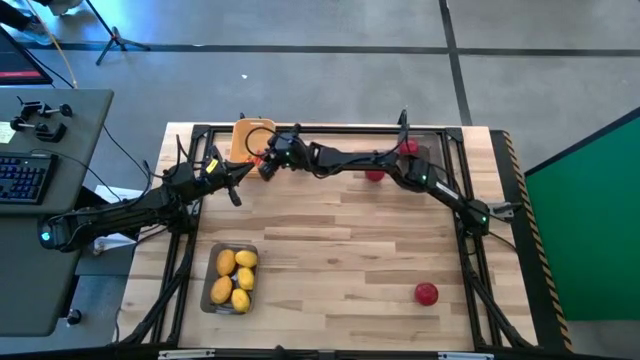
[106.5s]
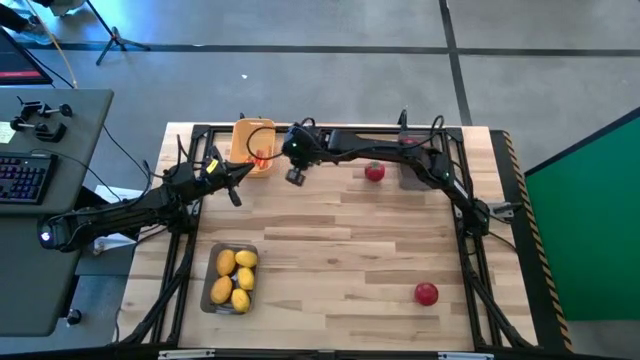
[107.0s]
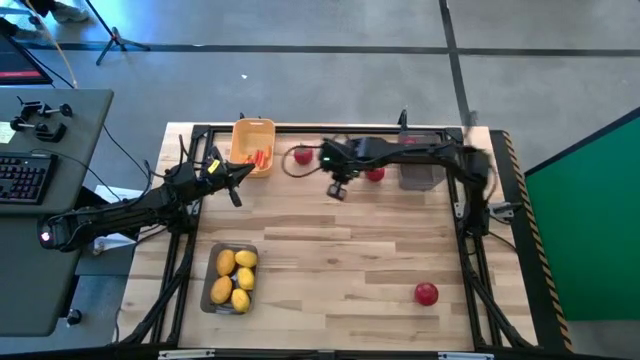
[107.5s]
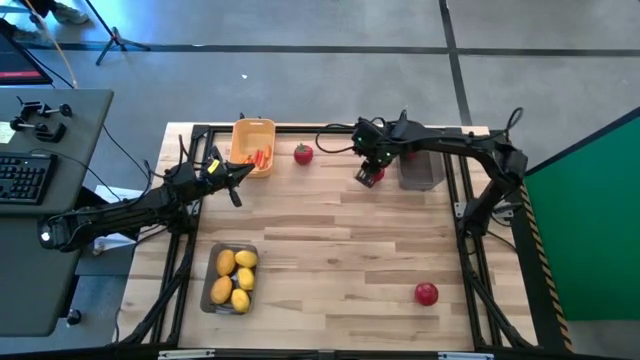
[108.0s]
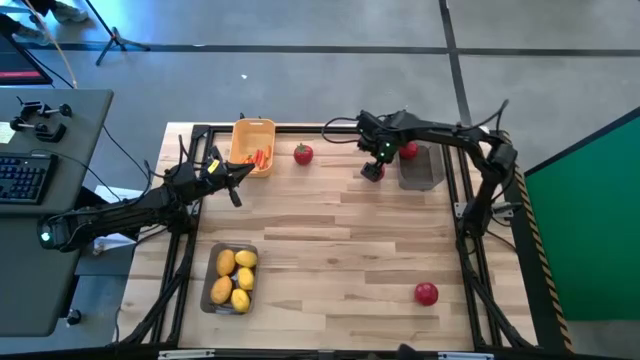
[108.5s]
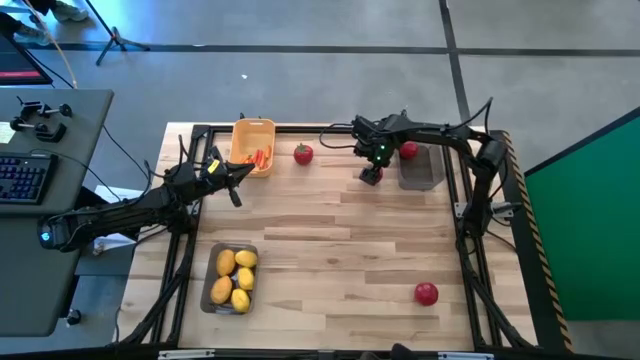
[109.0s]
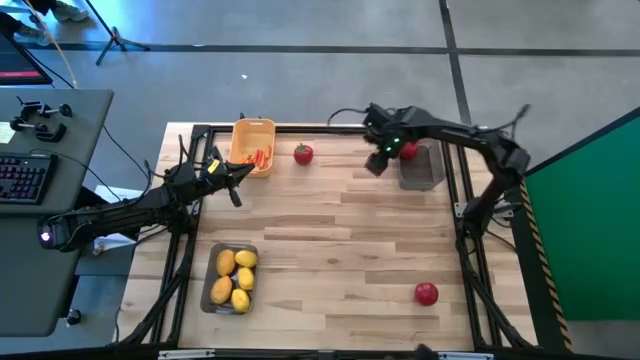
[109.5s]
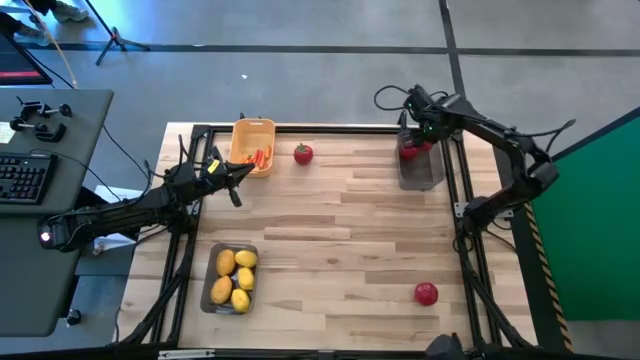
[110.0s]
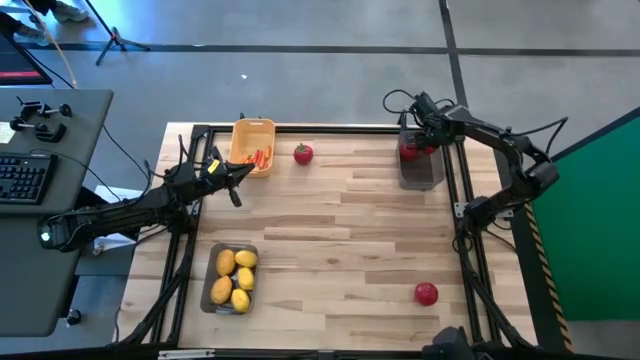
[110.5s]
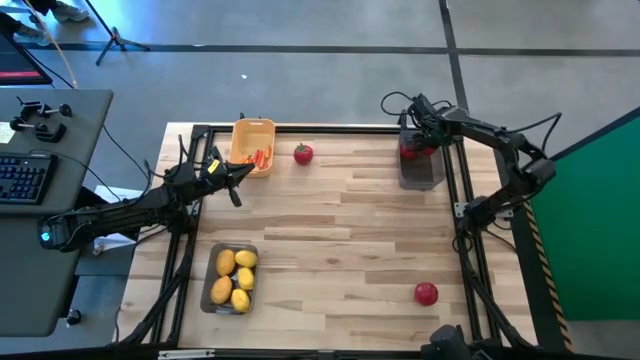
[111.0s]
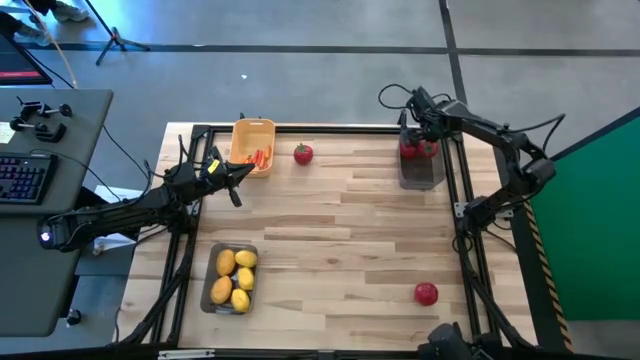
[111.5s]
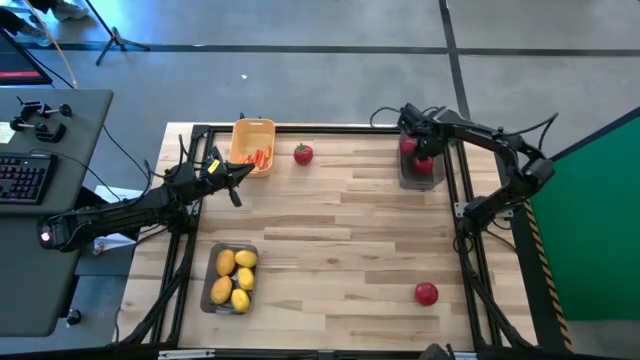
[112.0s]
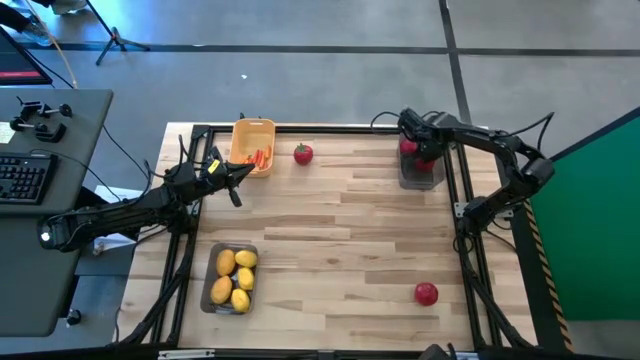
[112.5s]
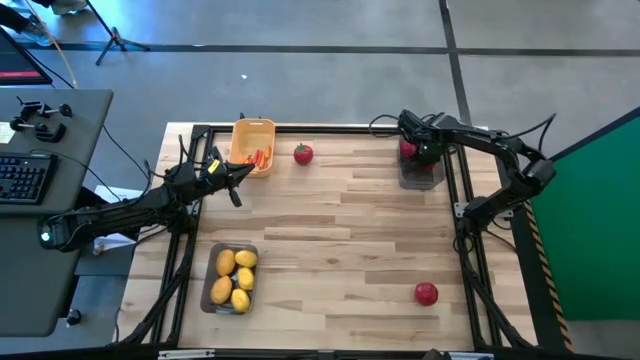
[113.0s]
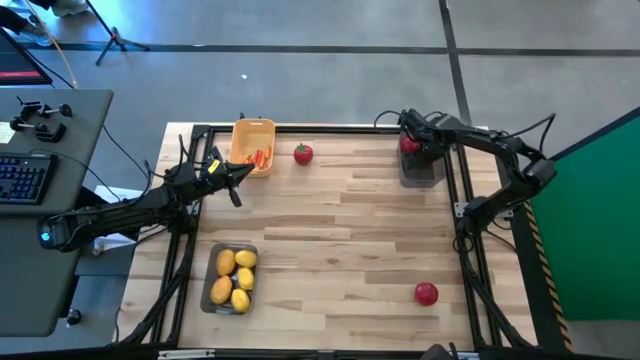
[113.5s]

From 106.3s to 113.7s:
Task: Sort produce into baskets
Put the tomato into the top gray bin

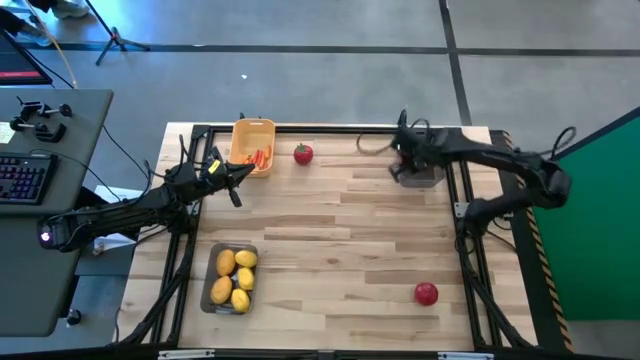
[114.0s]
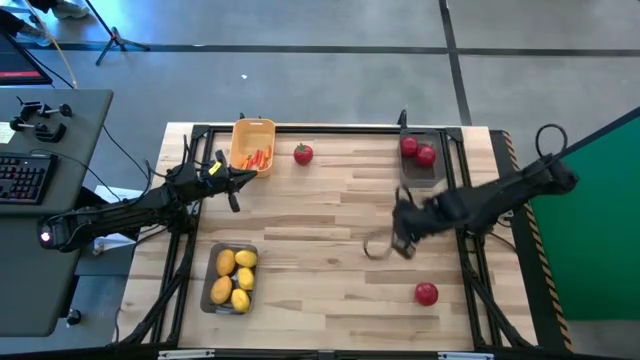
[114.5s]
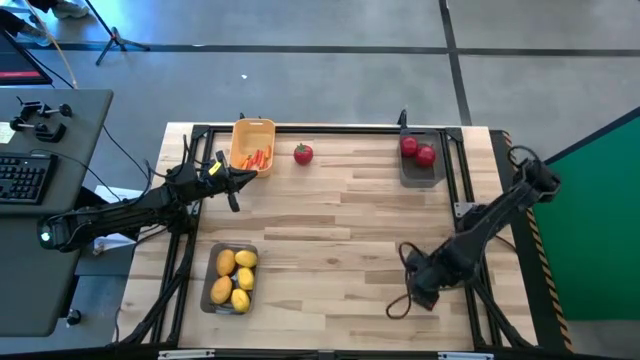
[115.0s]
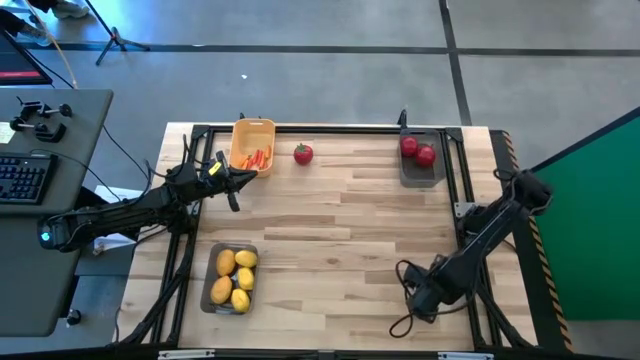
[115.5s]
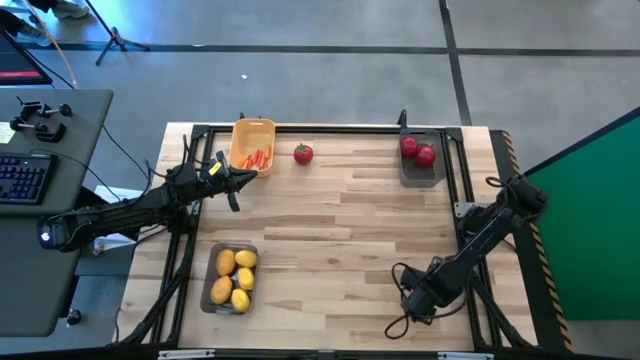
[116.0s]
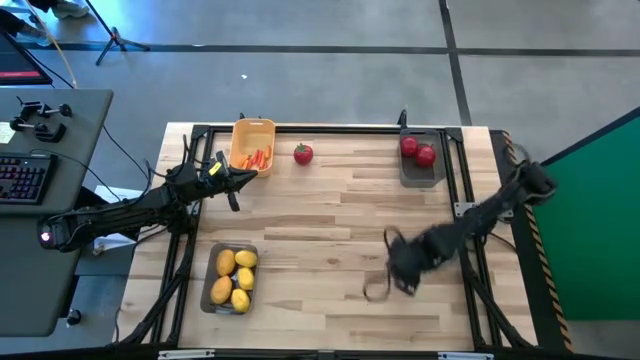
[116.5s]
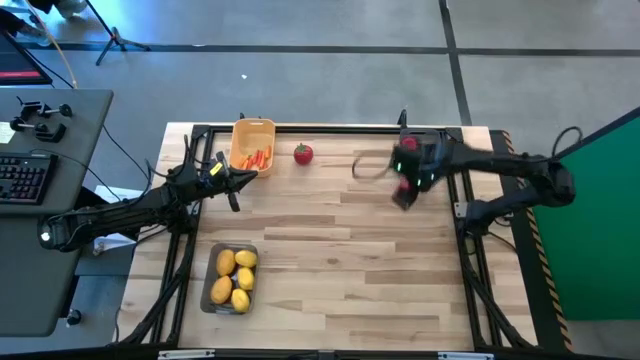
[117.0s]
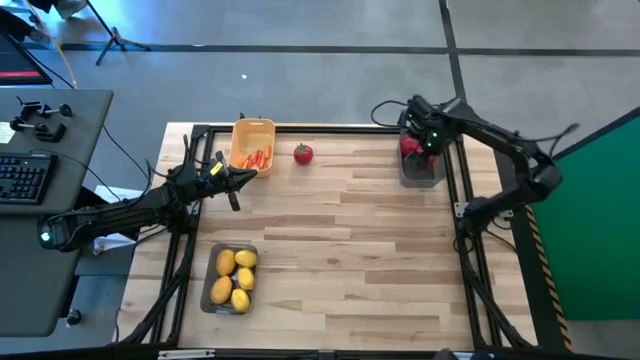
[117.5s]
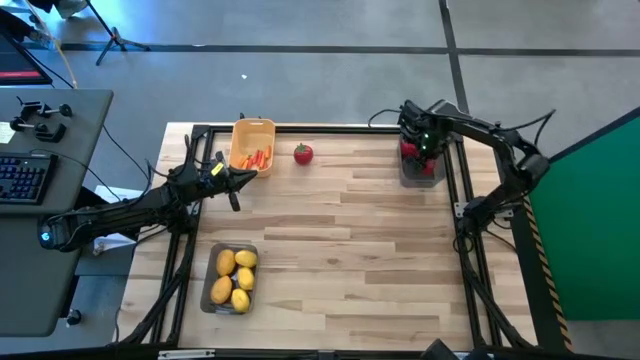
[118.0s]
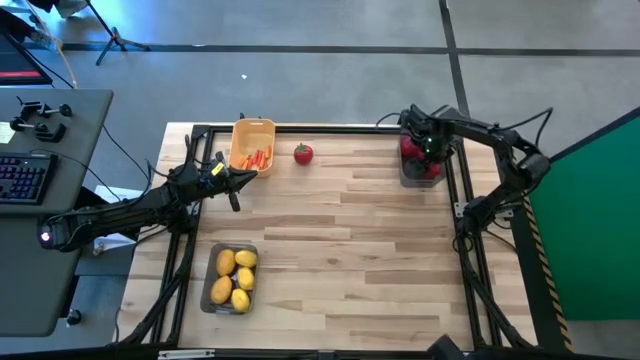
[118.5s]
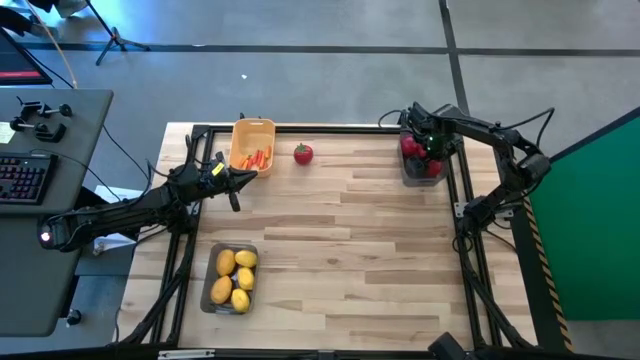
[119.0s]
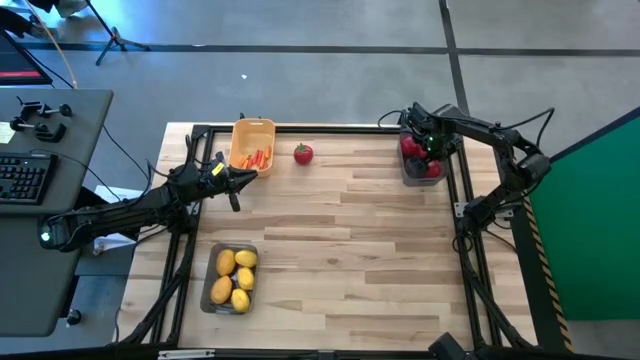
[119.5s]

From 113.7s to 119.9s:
Put the tomato into the top gray bin

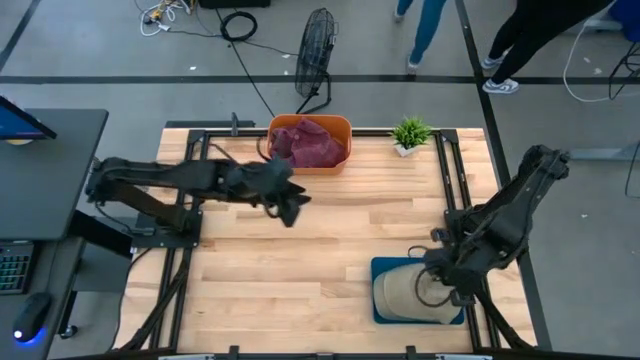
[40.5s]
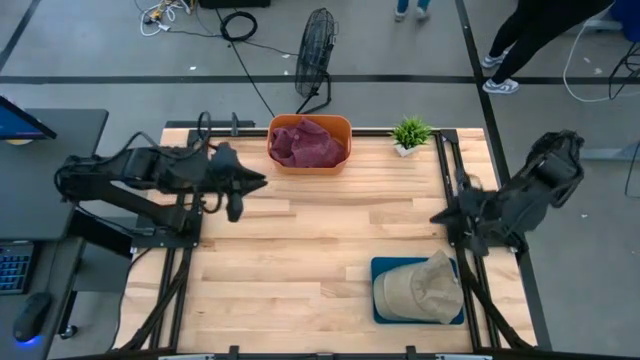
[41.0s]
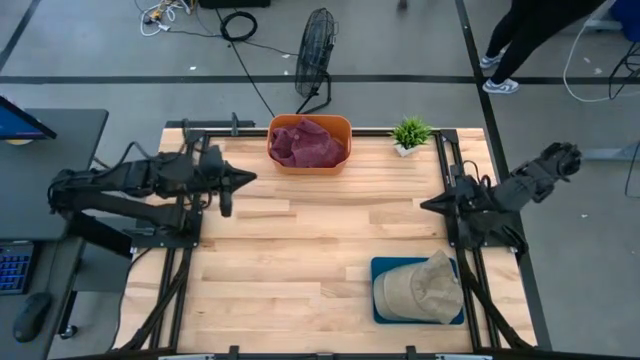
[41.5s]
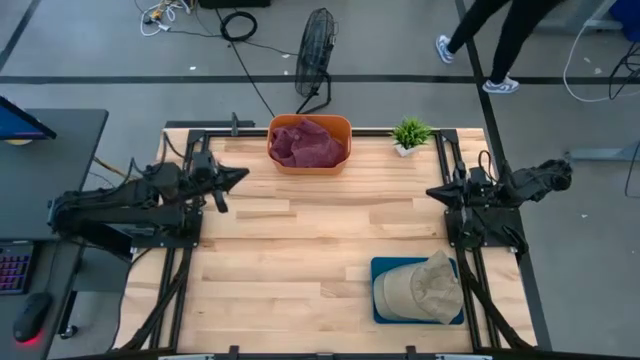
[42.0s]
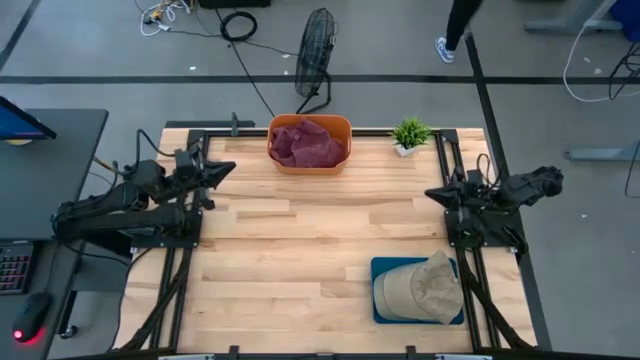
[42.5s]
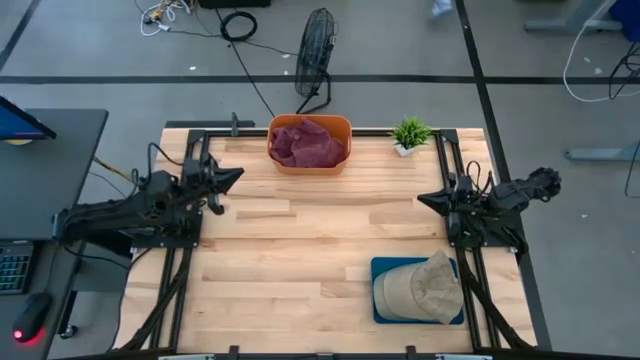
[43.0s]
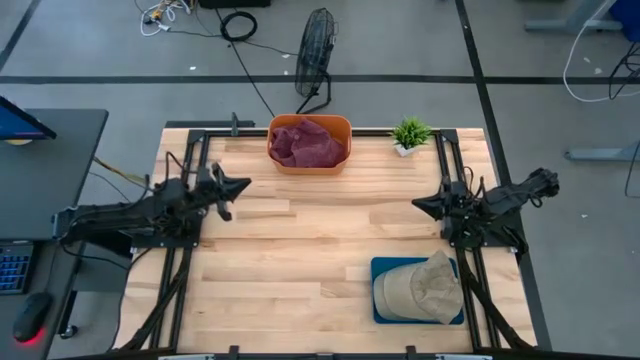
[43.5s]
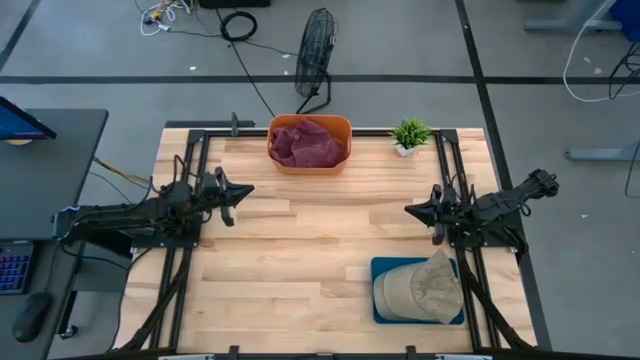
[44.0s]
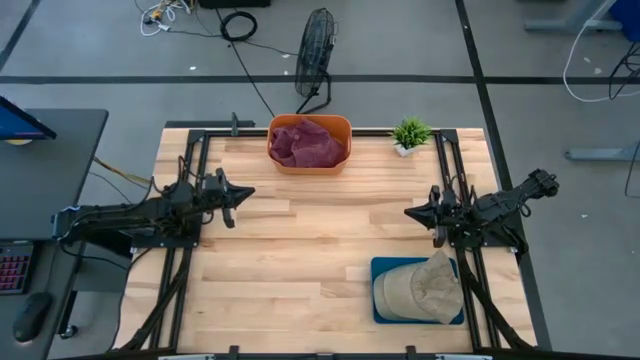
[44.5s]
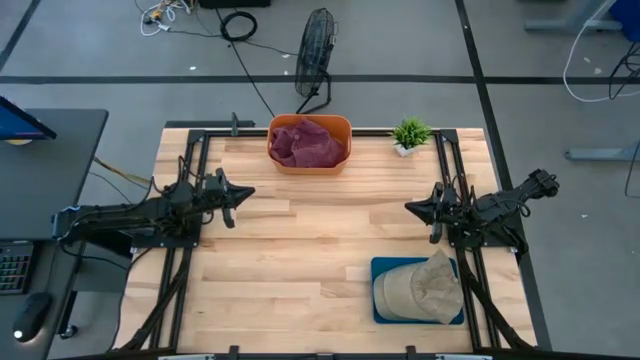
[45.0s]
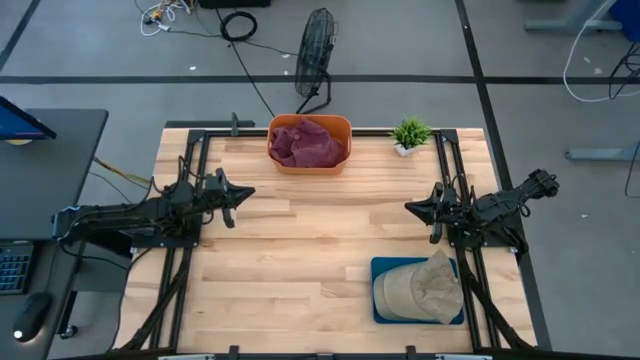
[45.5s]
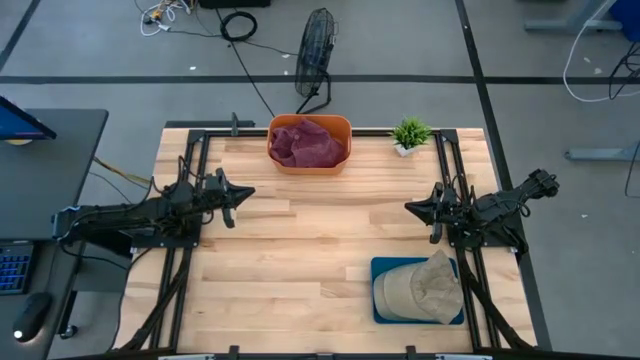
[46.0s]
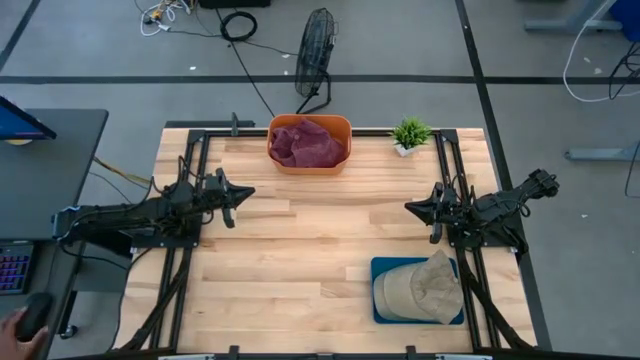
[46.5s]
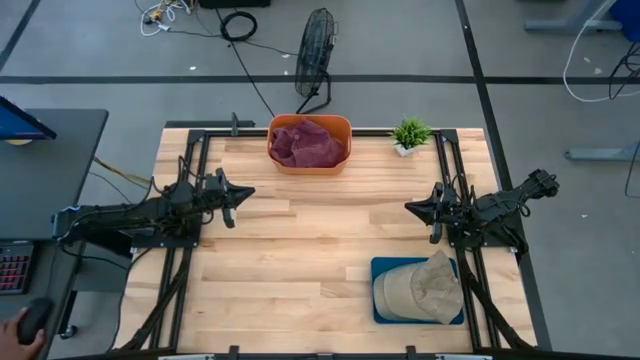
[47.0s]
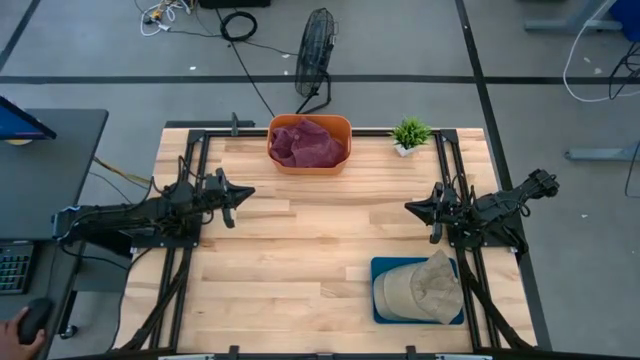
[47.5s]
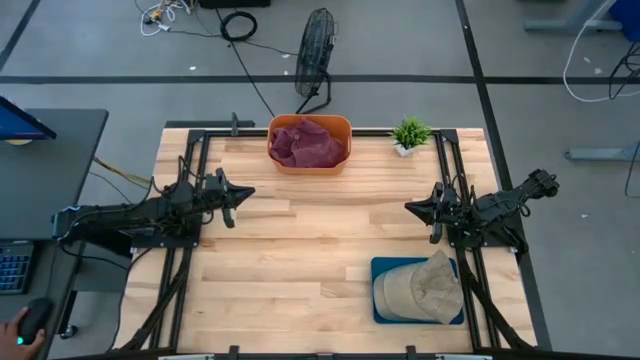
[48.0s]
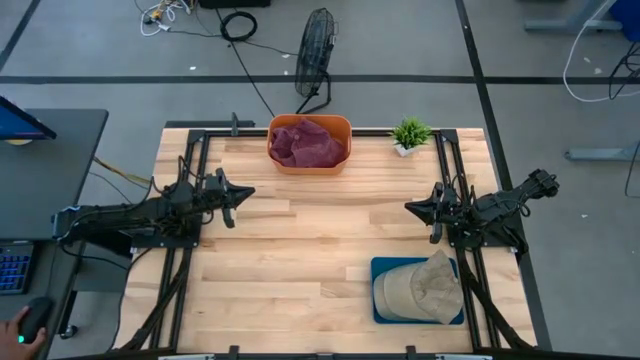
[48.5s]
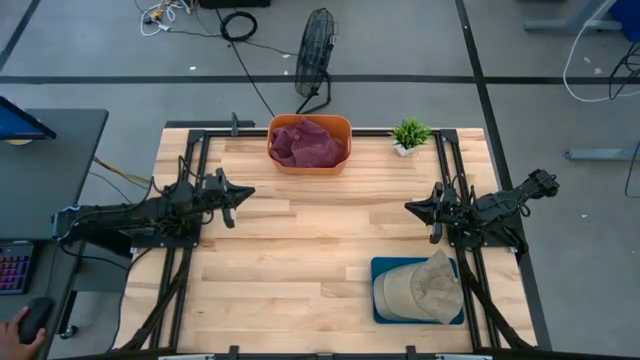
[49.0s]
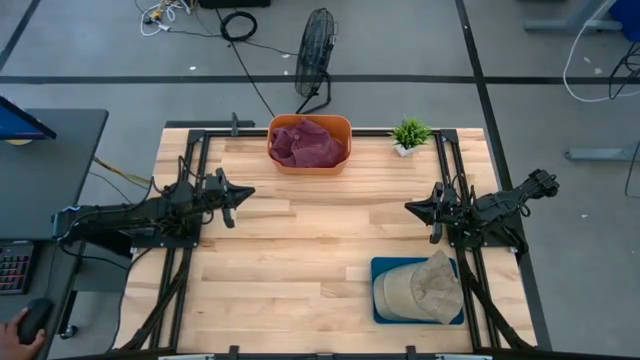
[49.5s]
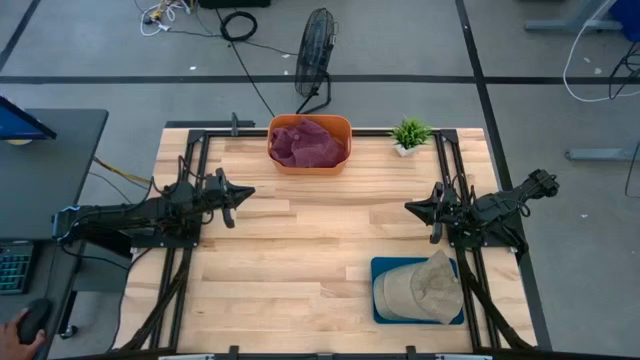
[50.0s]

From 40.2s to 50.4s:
Task: Pick & Place hat
Return to Home Position
